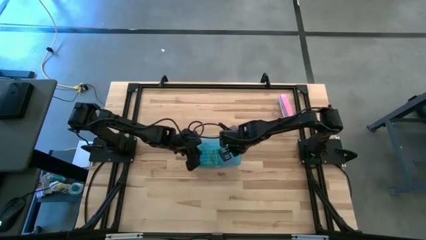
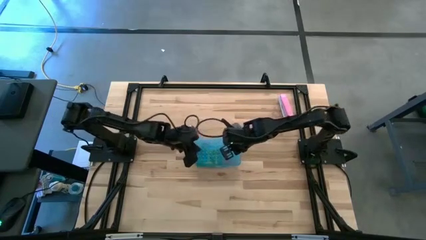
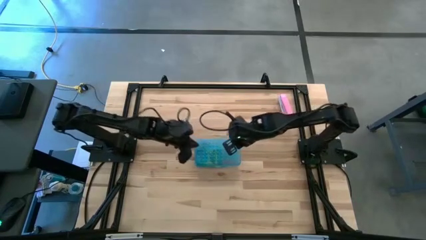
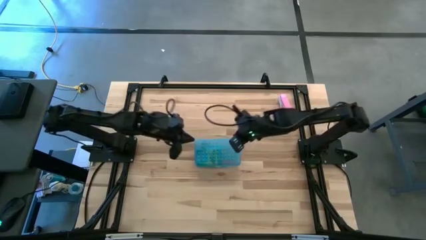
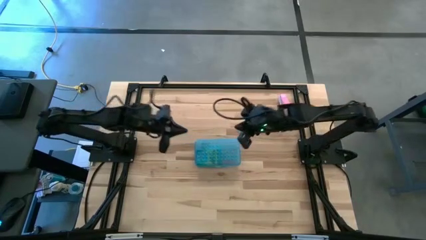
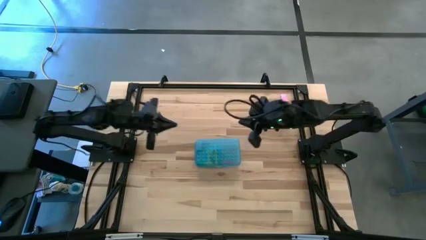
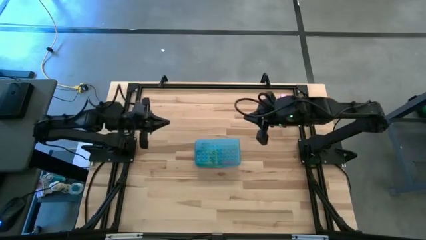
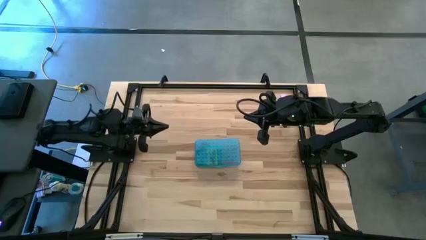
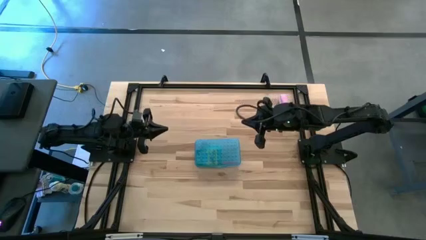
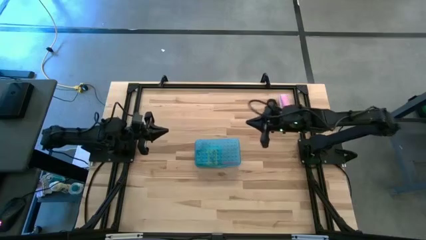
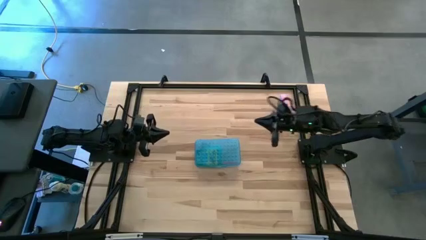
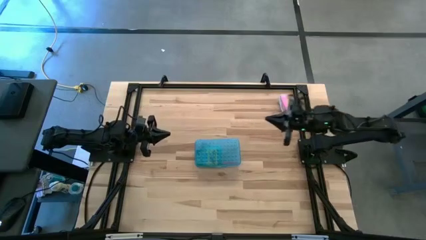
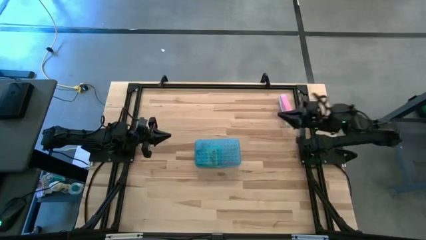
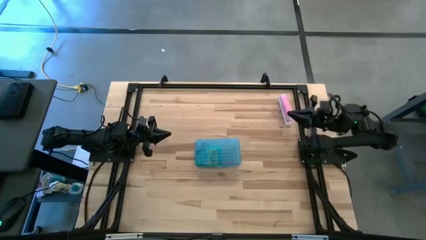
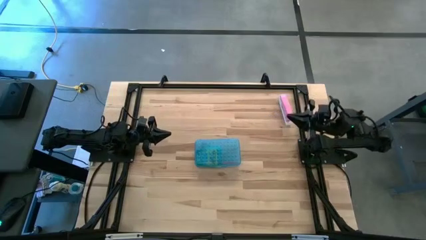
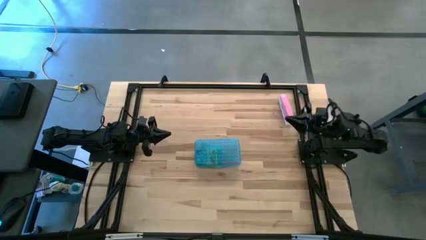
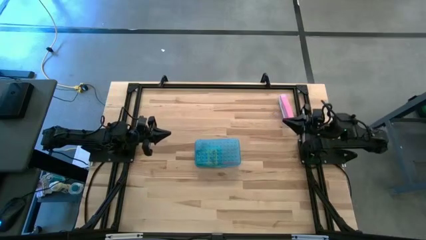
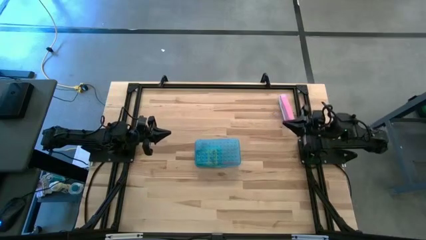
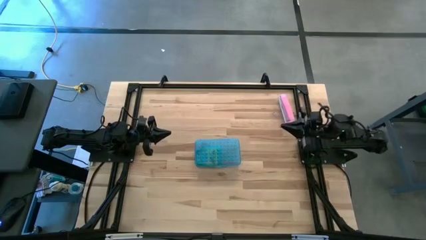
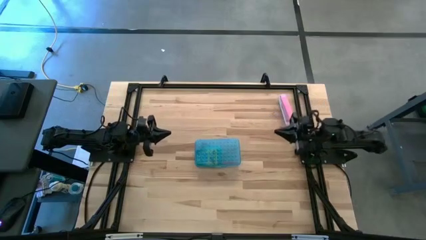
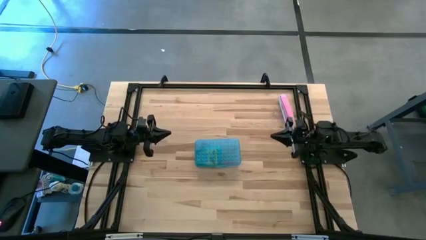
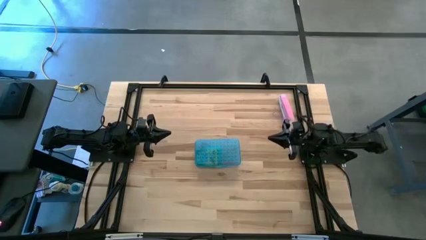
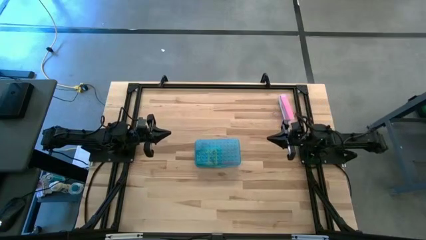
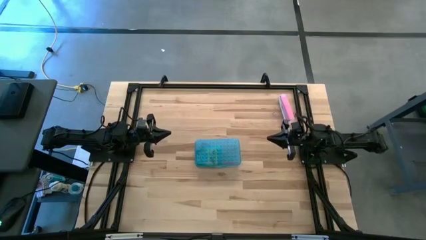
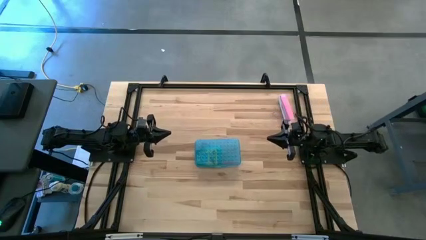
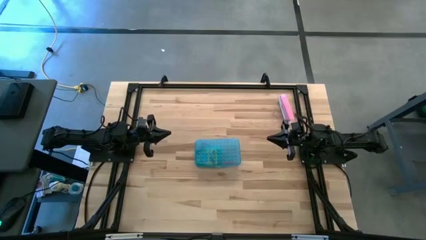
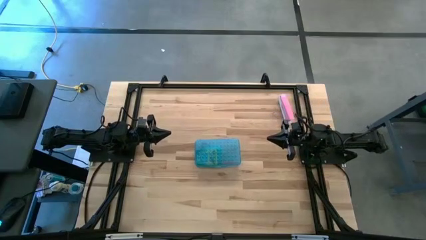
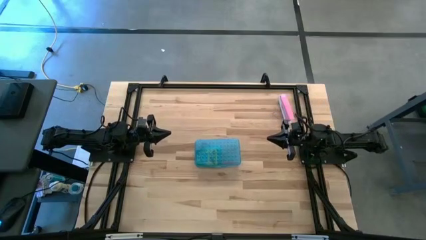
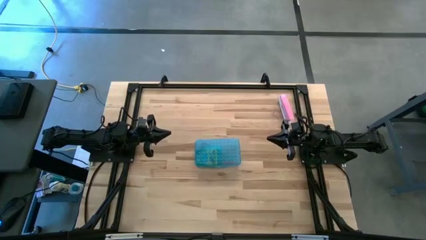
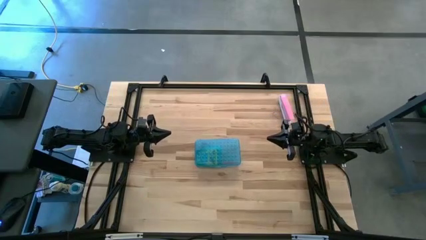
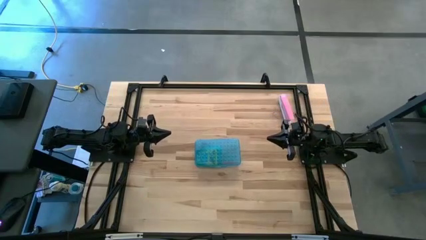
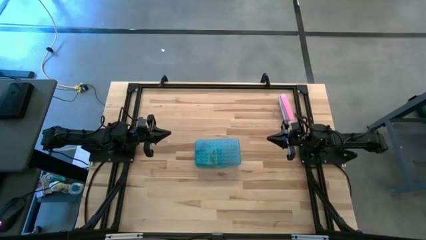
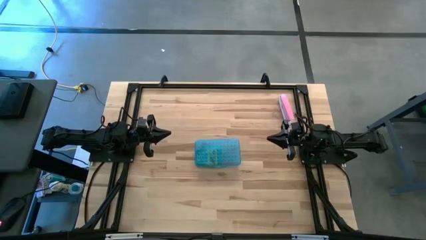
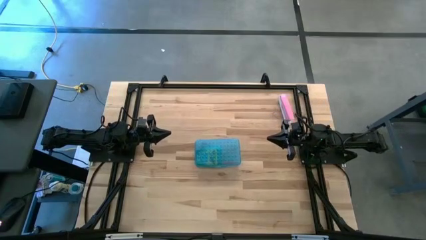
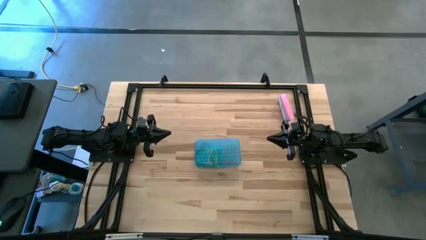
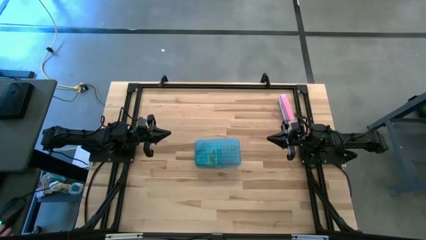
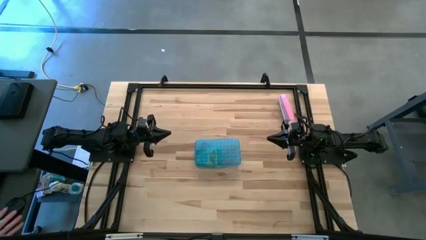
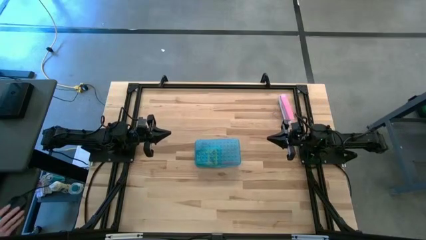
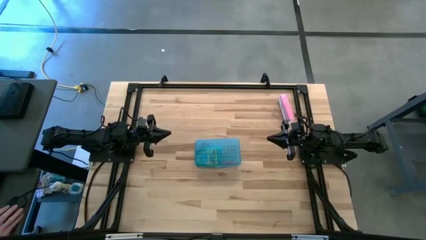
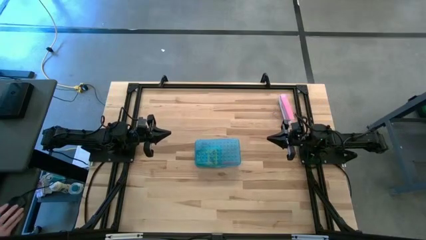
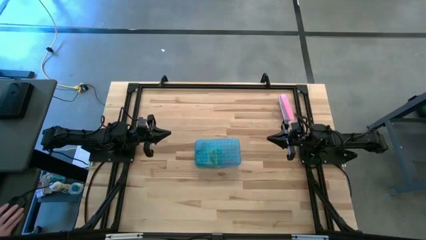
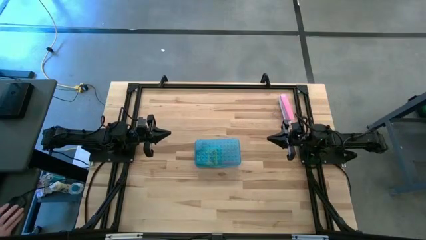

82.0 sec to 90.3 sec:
Task: Pack school essentials
Return to Home Position

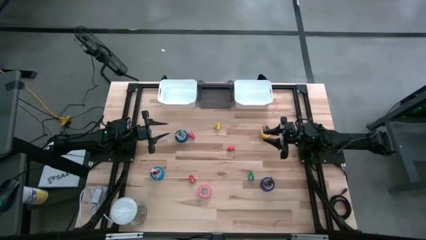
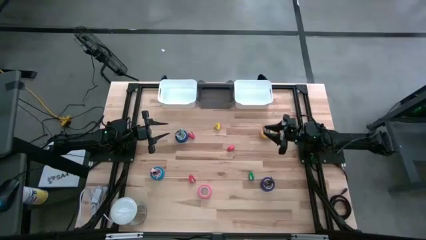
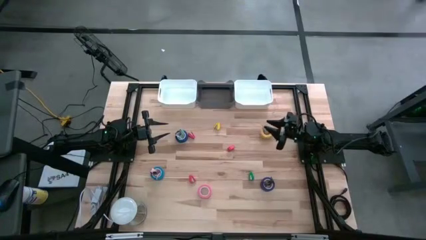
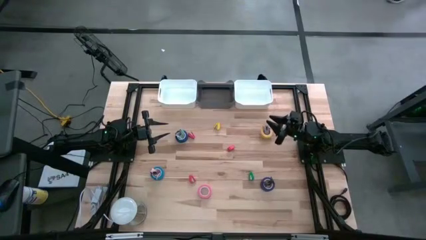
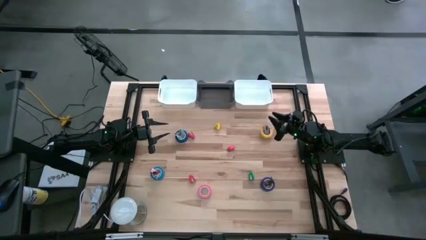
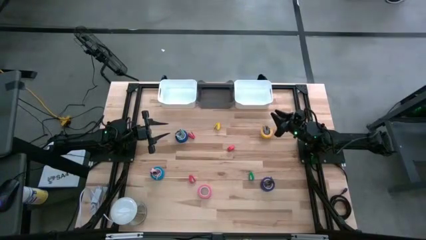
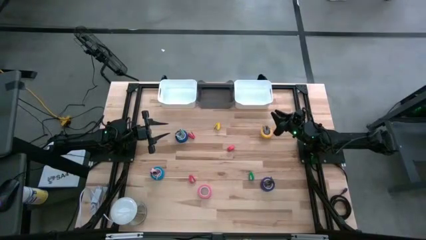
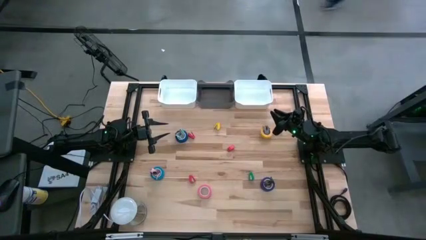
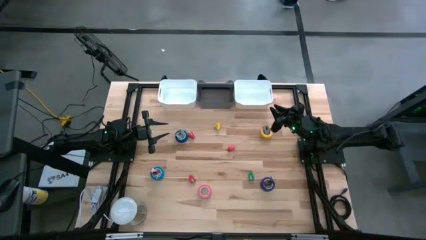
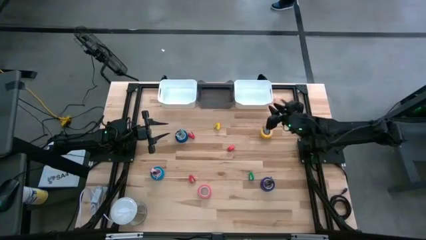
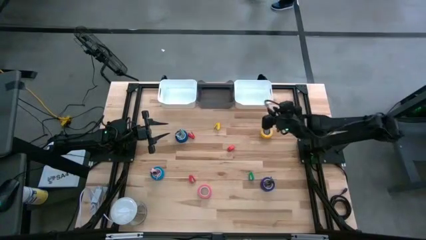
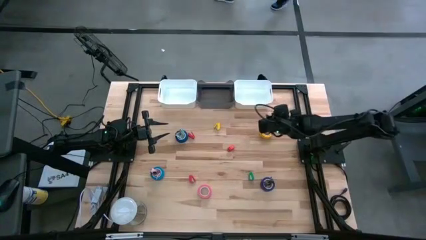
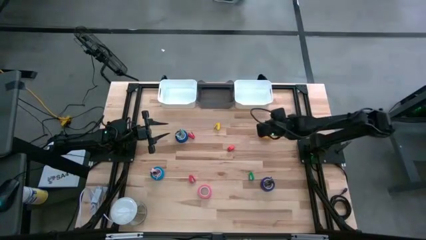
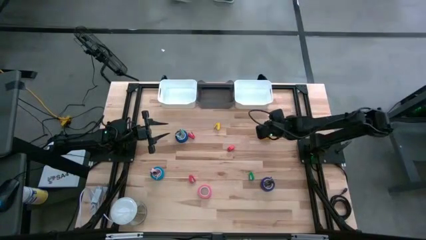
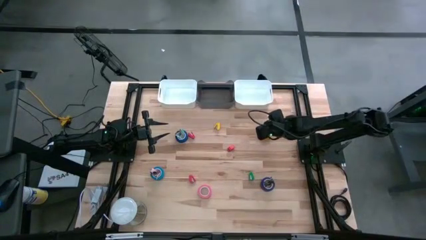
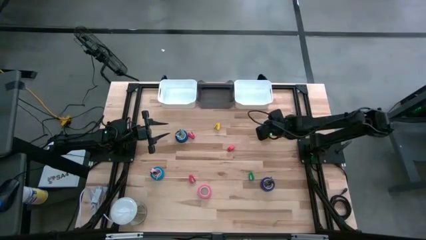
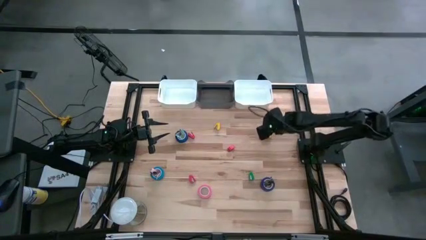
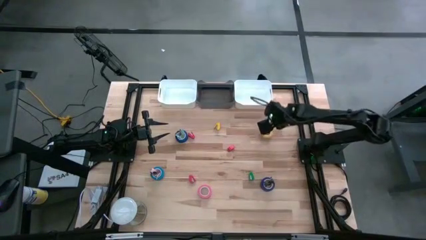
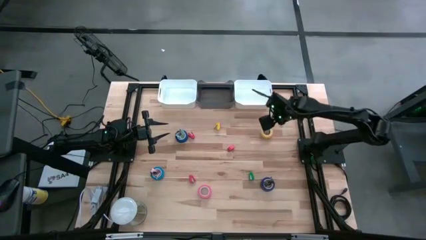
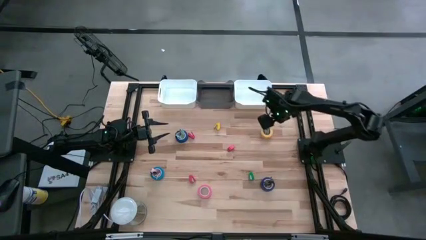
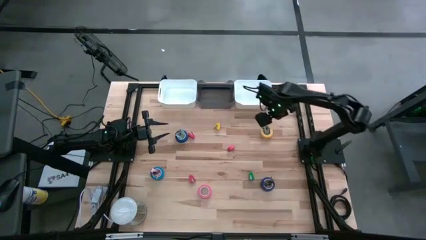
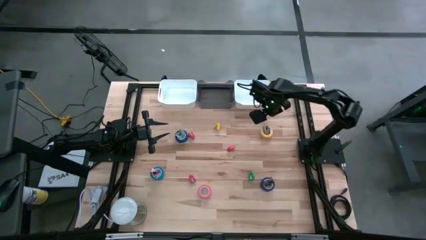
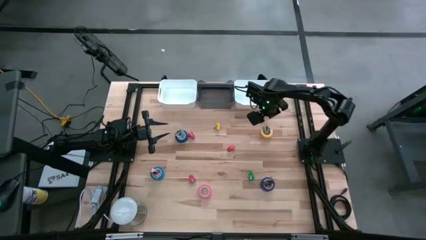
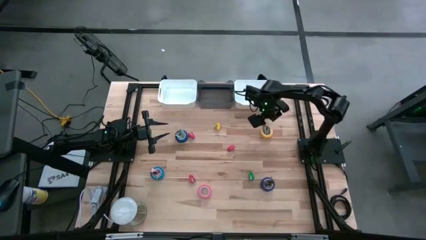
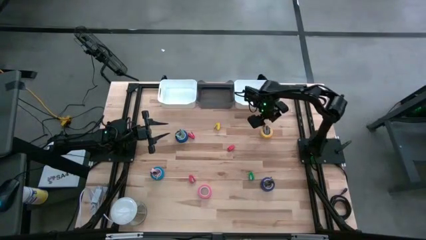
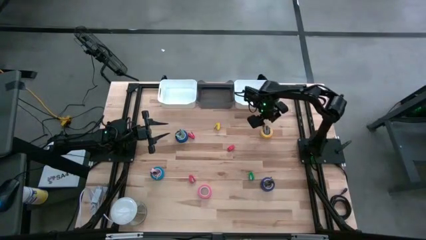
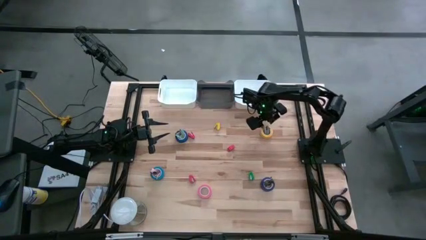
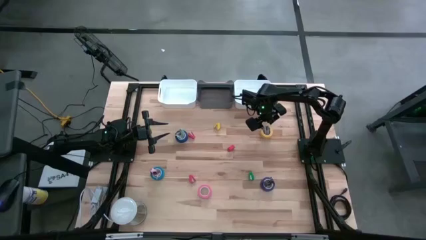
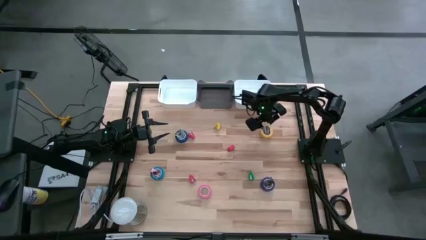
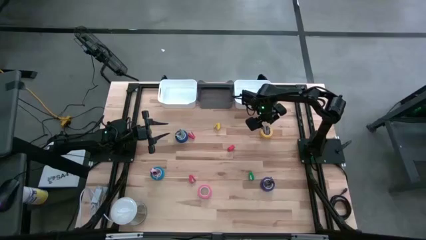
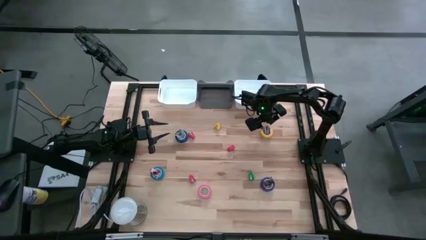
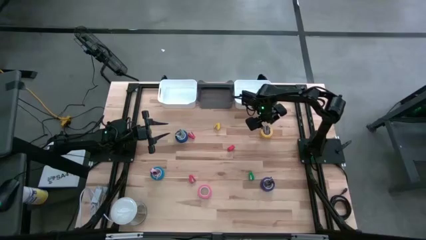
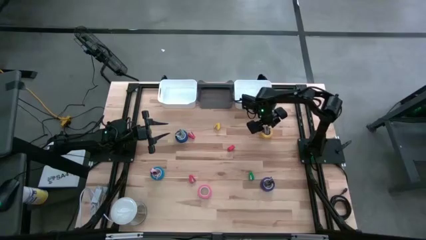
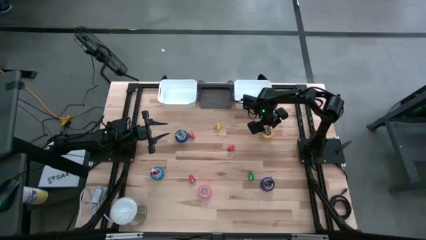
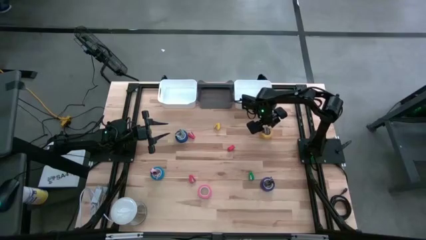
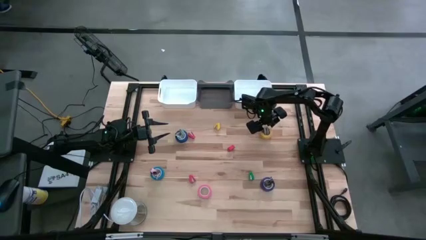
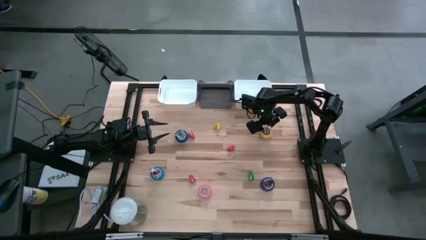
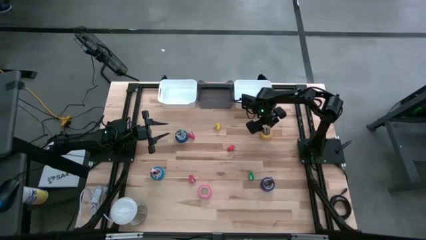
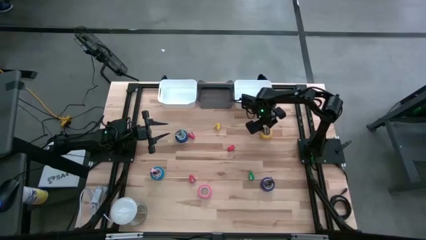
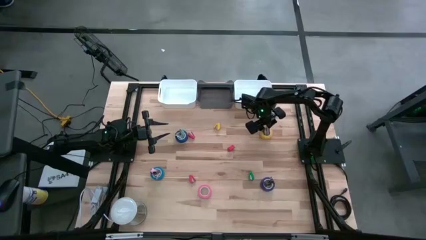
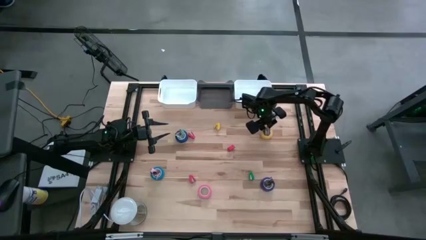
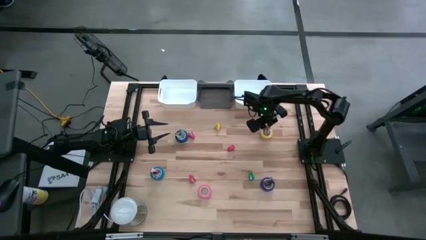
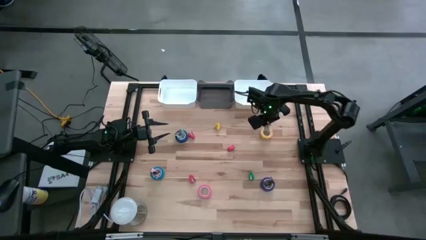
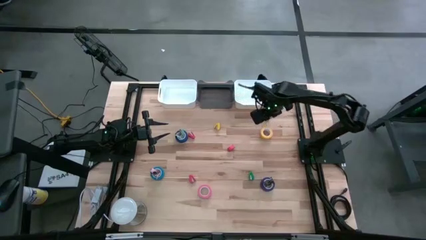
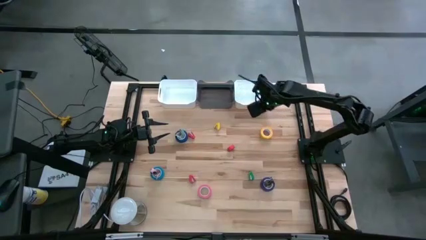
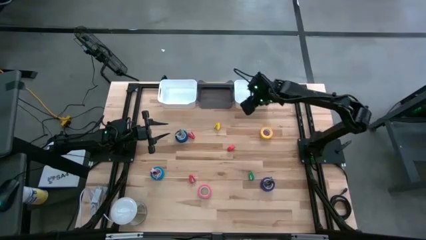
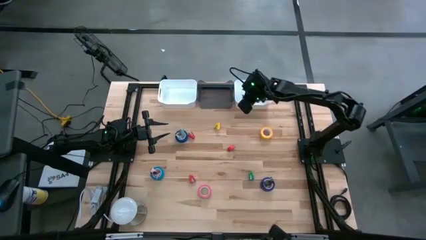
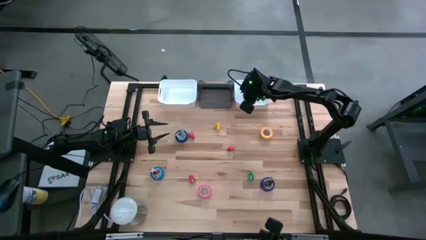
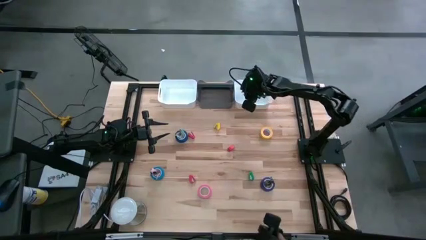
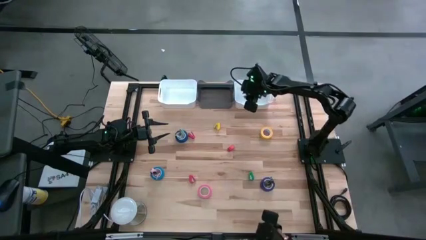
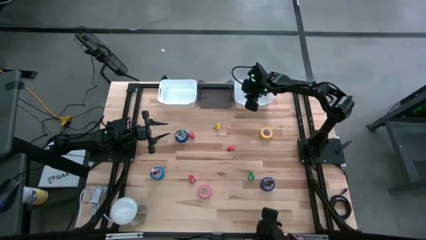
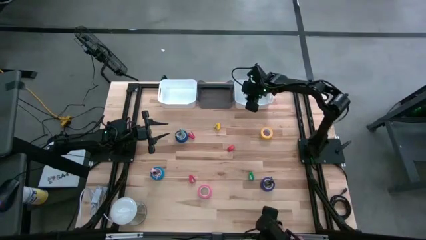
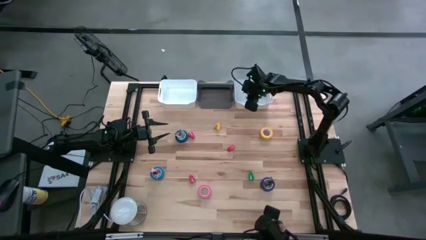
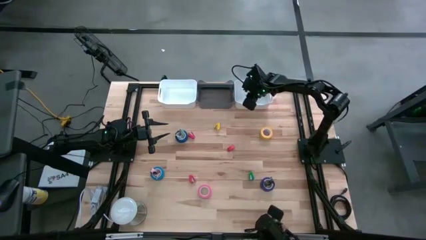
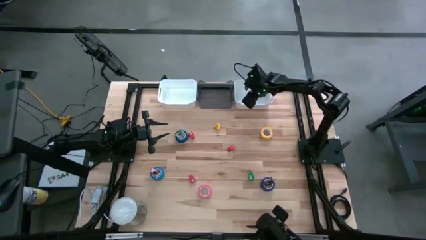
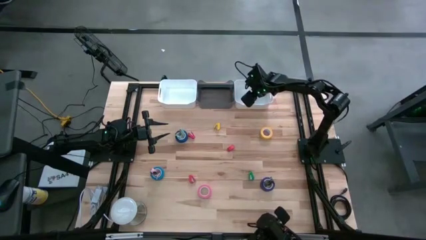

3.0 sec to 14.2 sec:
Task: Pick and place Stapler, Stapler remover, tape
Put the gray staple remover into the right white bin
